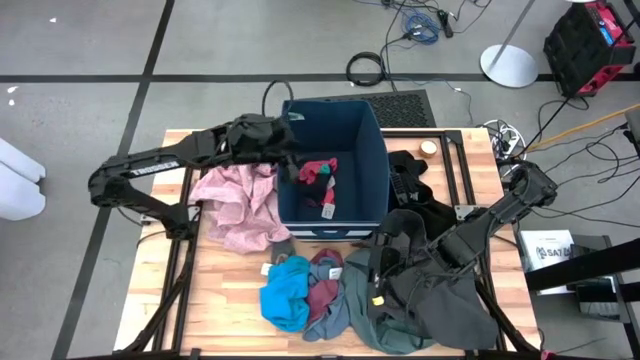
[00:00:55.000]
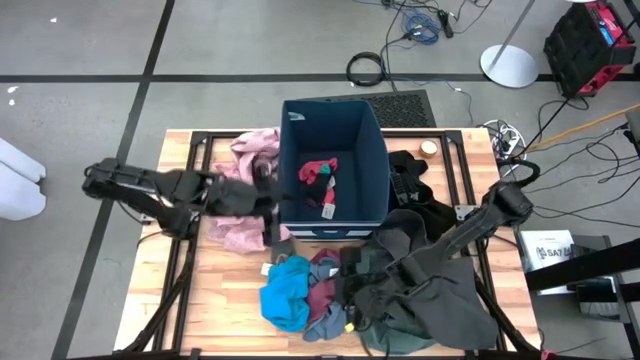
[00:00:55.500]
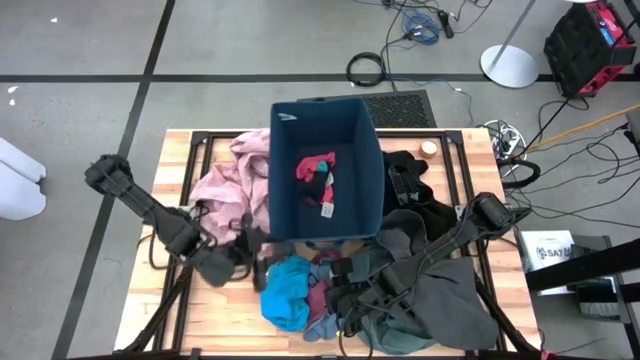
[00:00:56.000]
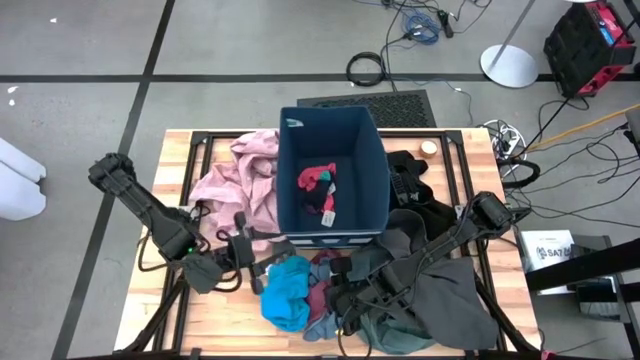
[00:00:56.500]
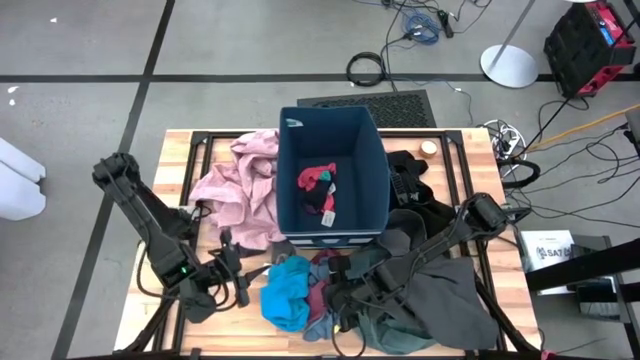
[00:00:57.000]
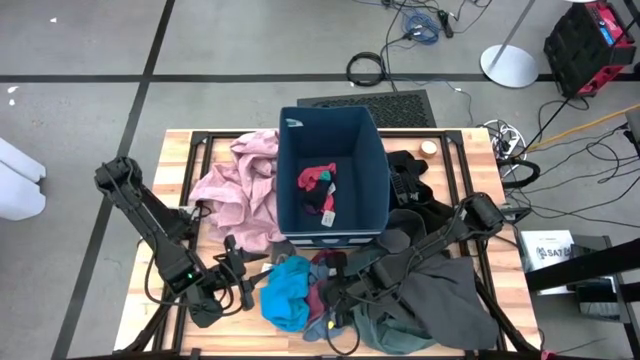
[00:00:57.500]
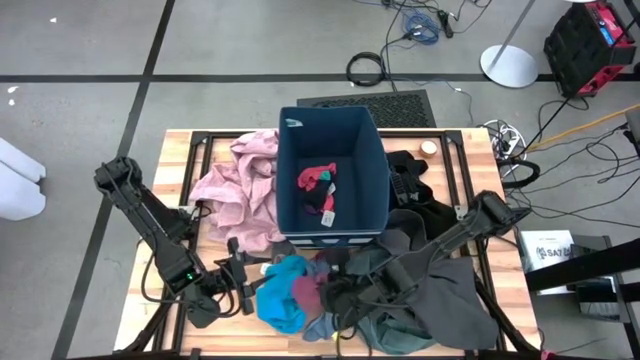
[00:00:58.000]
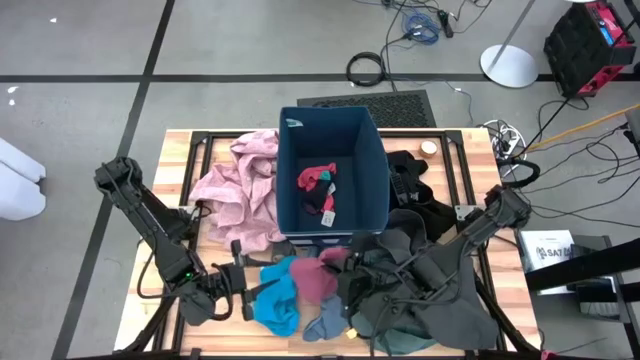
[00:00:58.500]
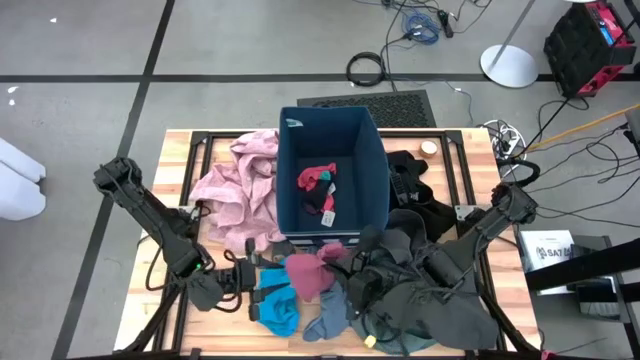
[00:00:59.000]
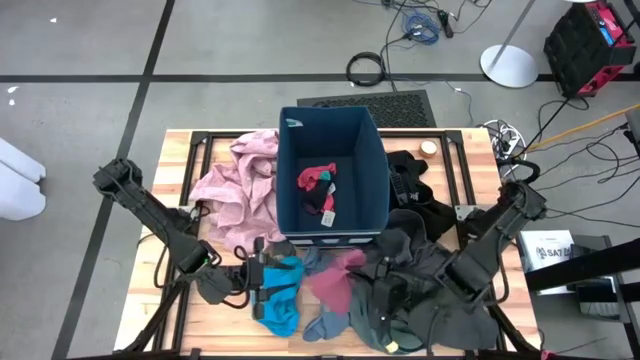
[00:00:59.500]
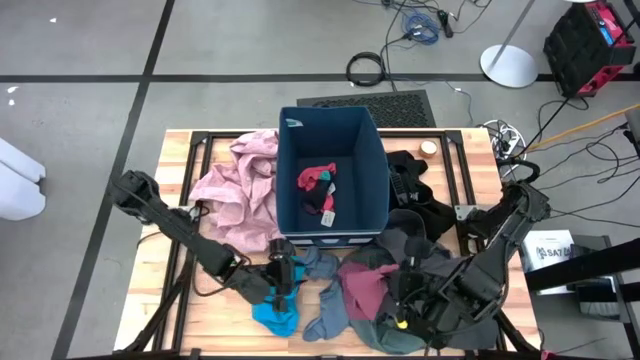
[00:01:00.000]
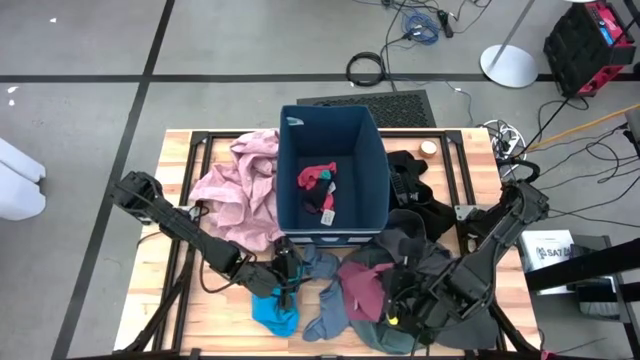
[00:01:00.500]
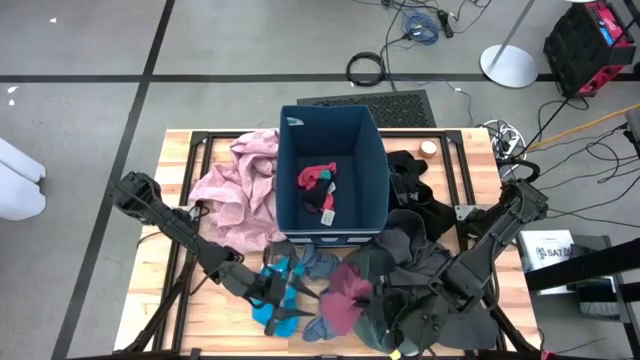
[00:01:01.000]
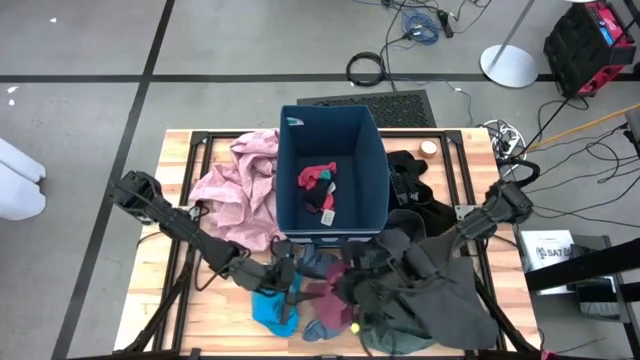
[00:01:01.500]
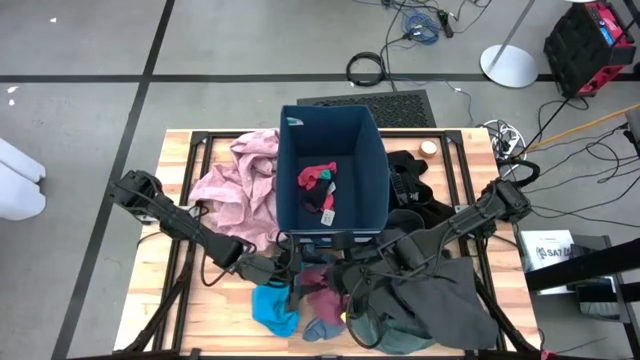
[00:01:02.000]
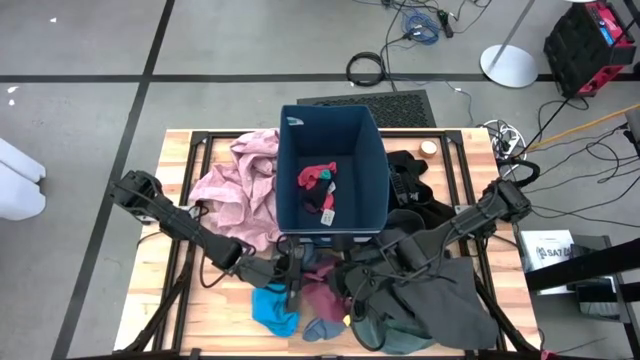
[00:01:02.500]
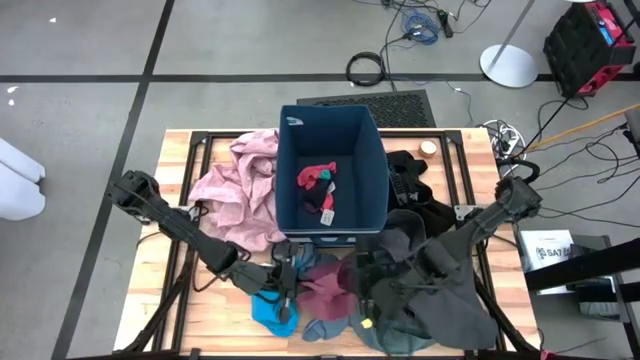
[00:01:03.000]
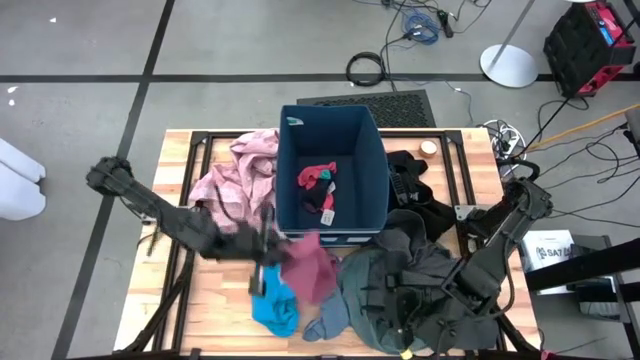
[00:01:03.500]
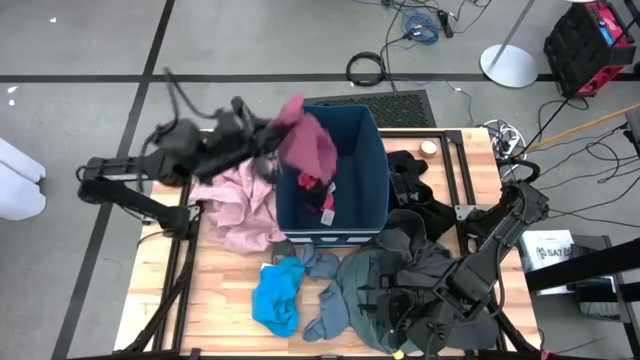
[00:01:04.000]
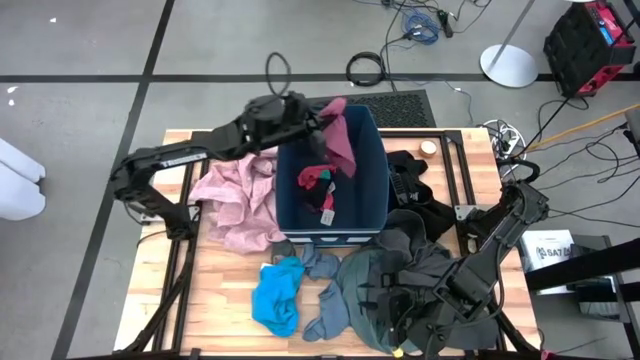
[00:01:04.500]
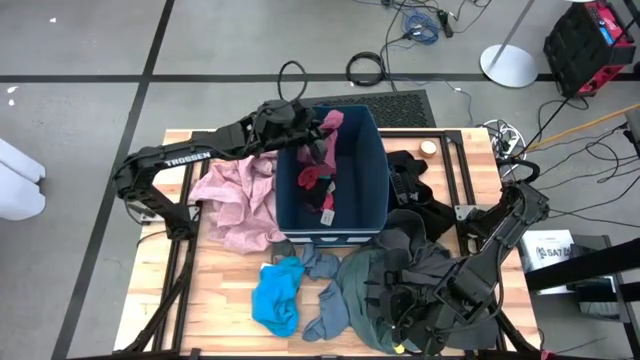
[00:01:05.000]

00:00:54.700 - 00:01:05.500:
Task: Sort clothes
Put the pink underwear into the blue laundry organizer

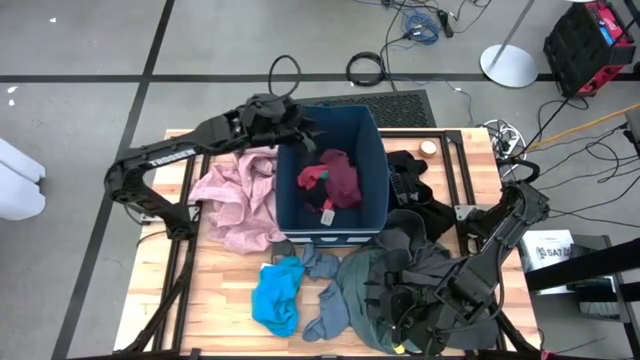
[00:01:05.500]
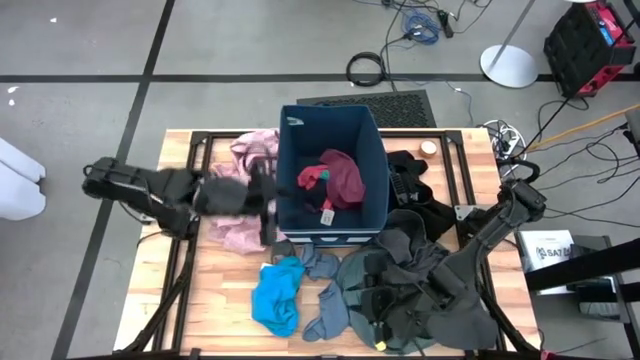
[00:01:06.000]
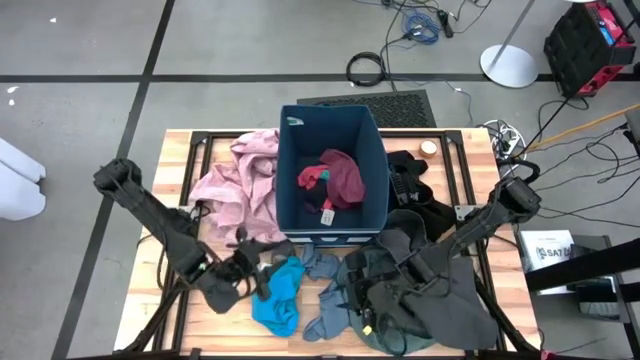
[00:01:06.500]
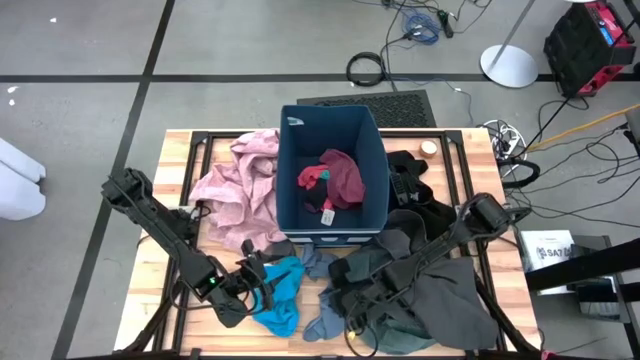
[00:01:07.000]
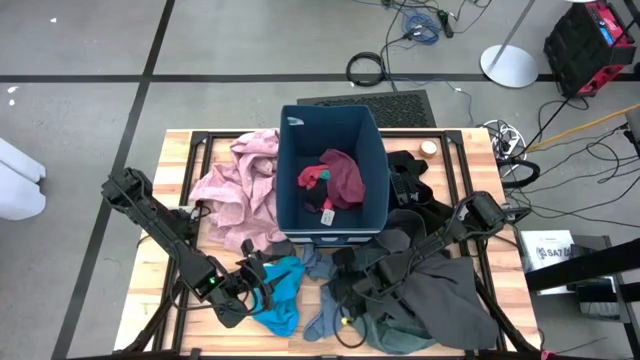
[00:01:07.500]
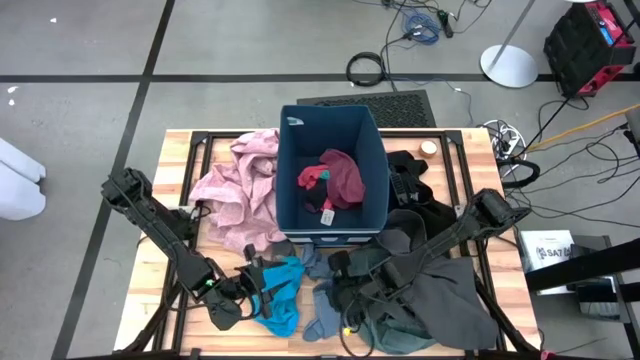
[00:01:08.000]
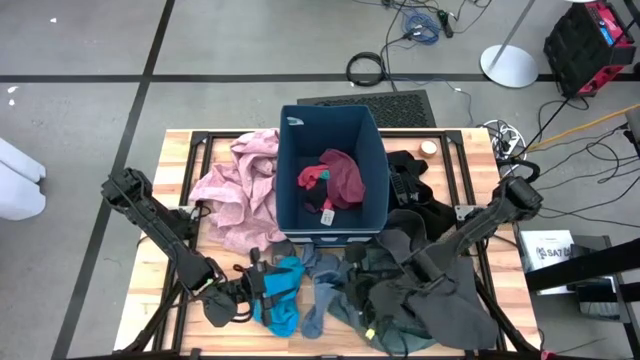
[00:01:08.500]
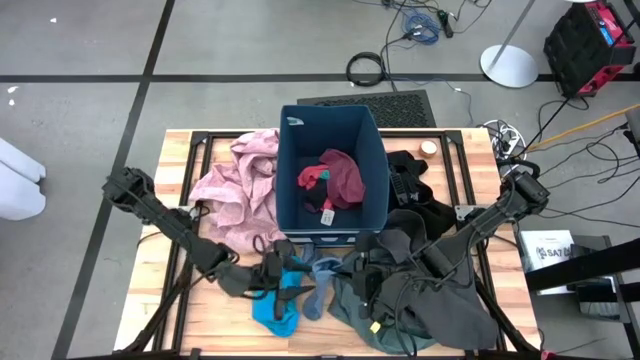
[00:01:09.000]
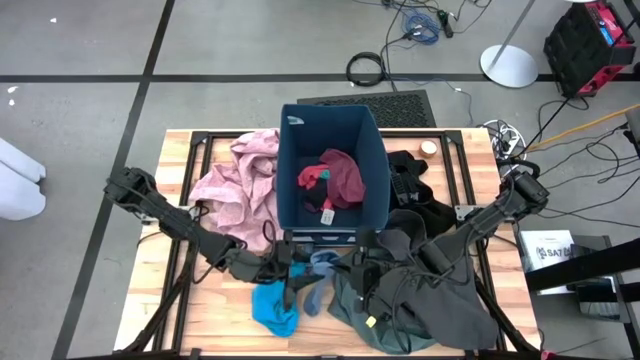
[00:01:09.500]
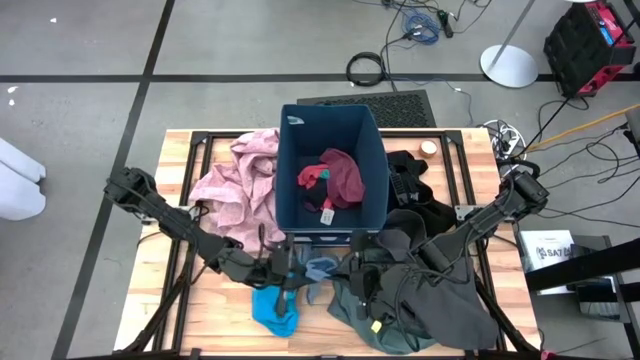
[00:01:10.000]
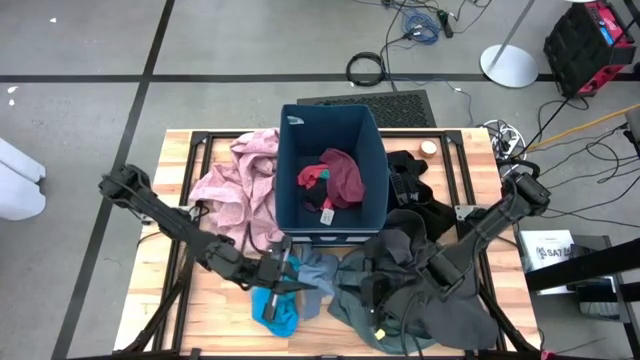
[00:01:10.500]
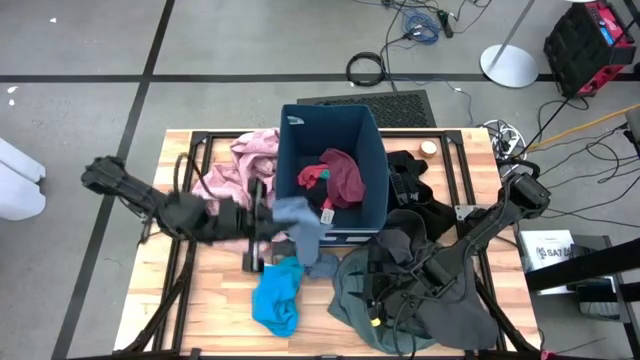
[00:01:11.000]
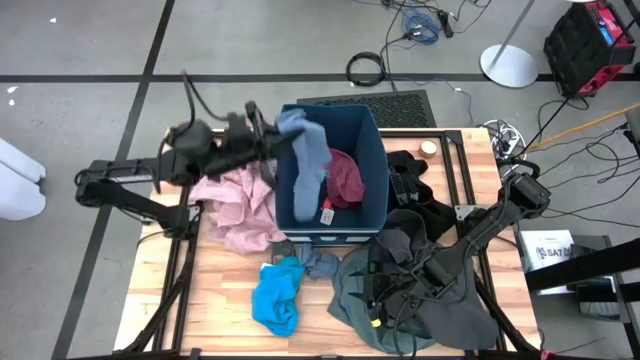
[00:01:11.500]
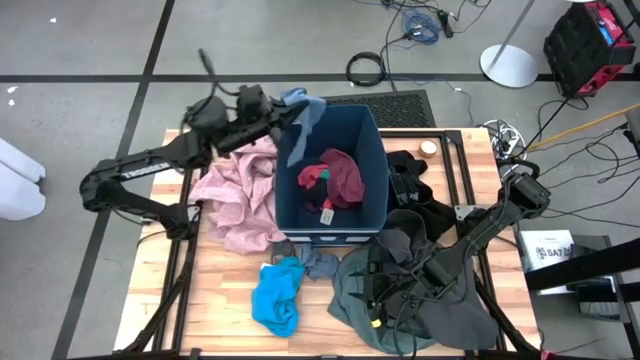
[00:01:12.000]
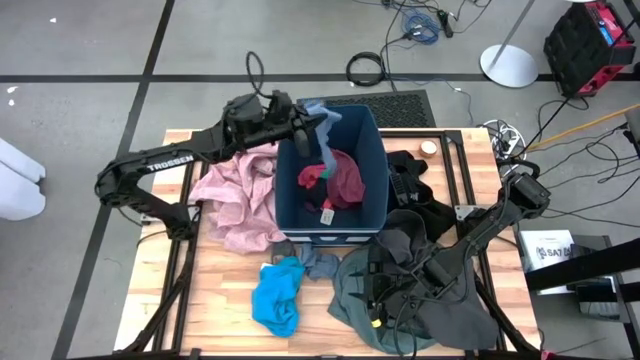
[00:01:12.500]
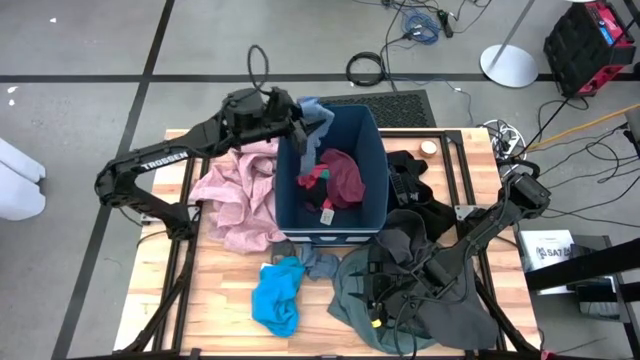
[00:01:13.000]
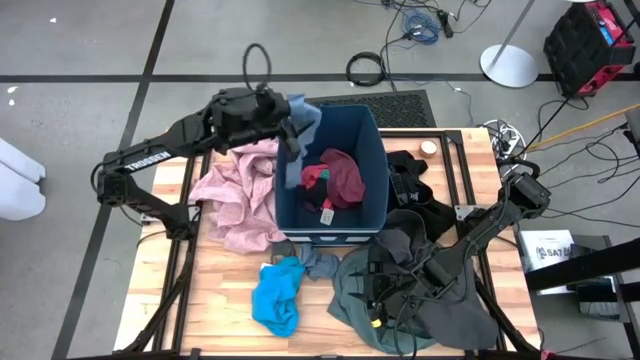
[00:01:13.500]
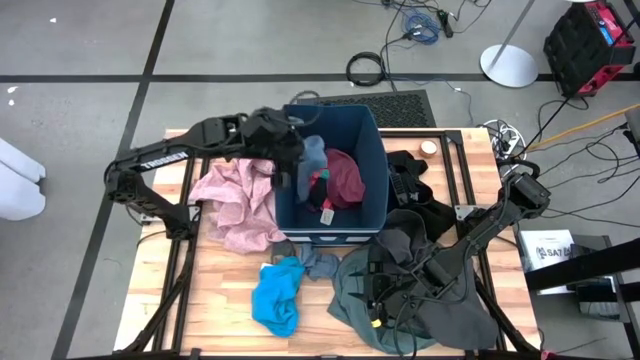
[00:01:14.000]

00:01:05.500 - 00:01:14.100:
Put the blue sock into the blue laundry organizer
